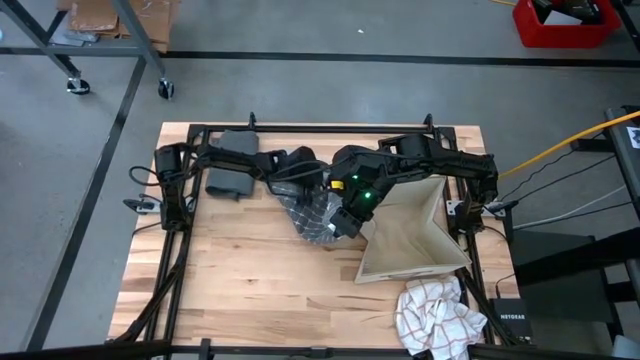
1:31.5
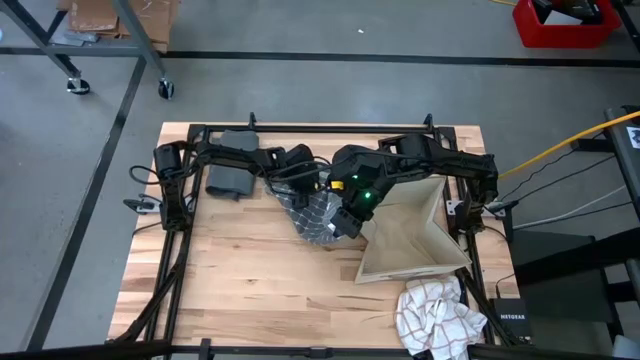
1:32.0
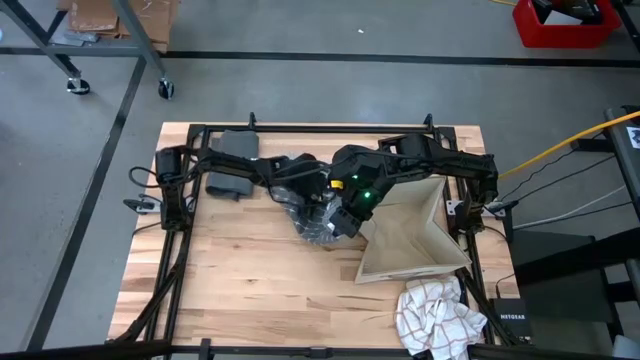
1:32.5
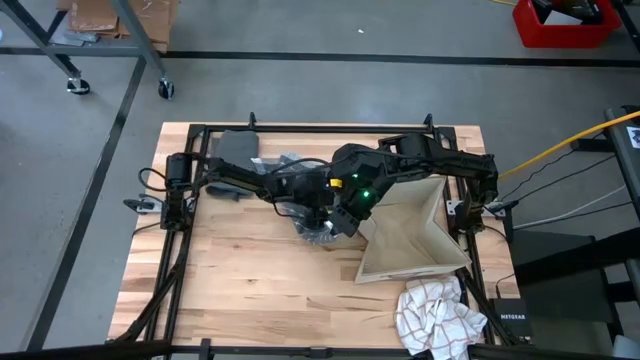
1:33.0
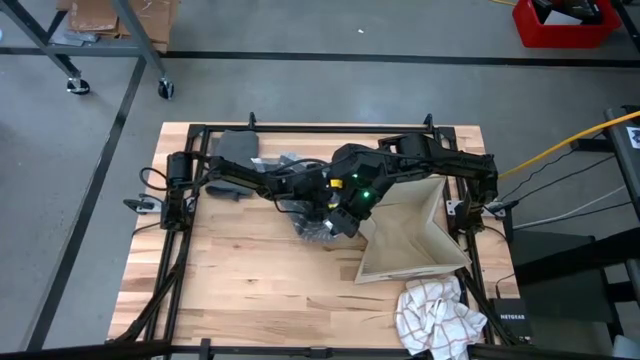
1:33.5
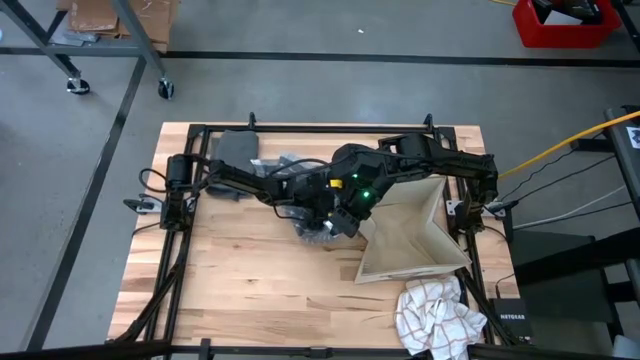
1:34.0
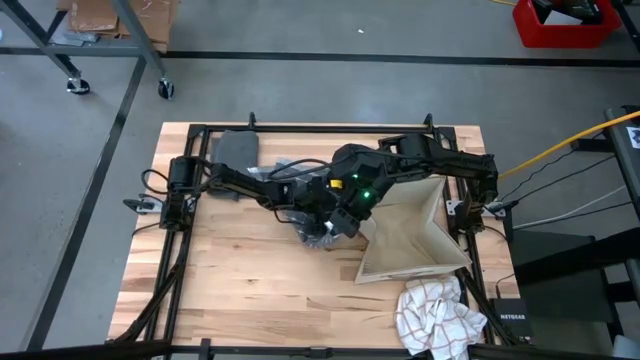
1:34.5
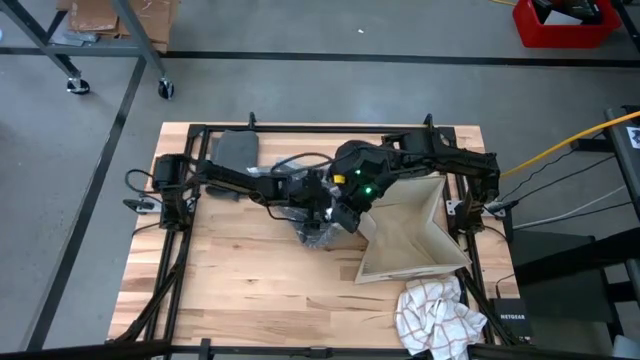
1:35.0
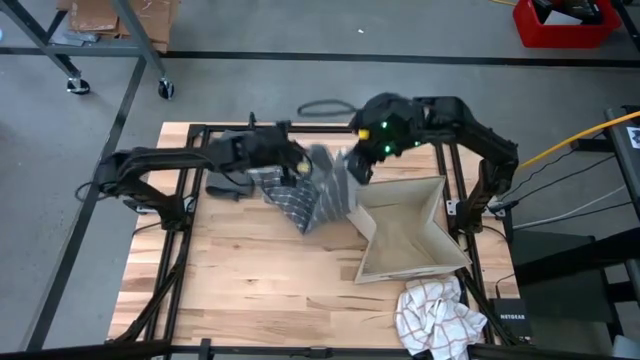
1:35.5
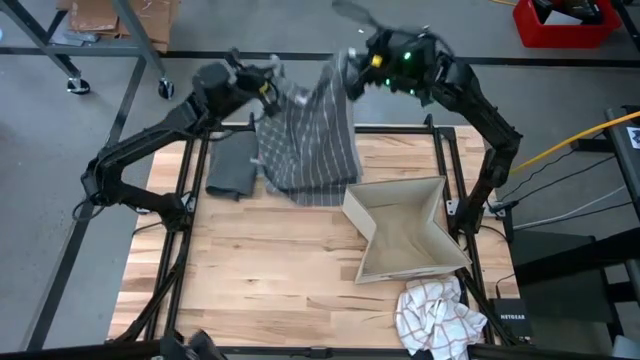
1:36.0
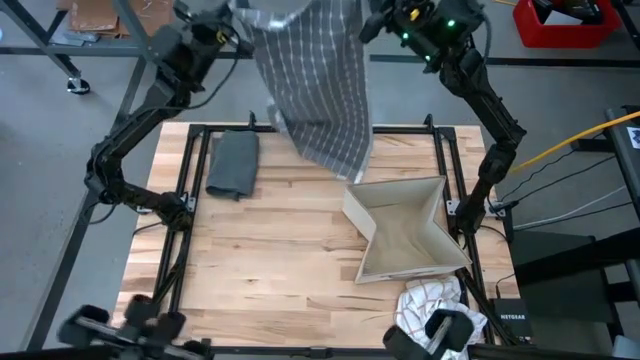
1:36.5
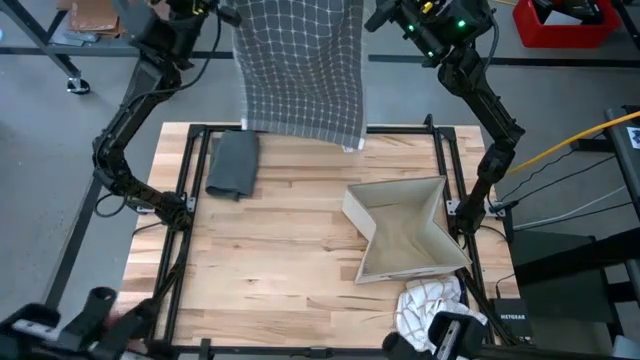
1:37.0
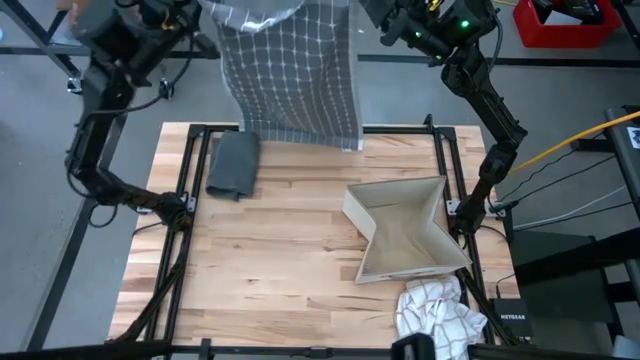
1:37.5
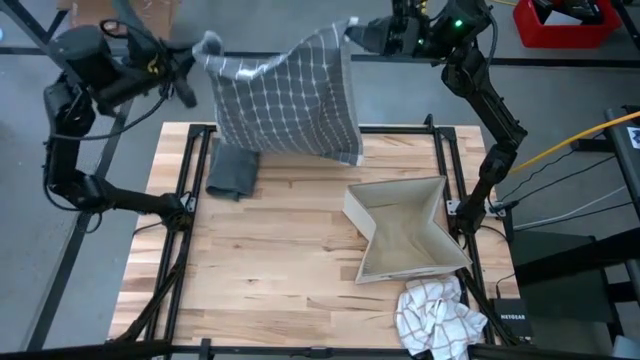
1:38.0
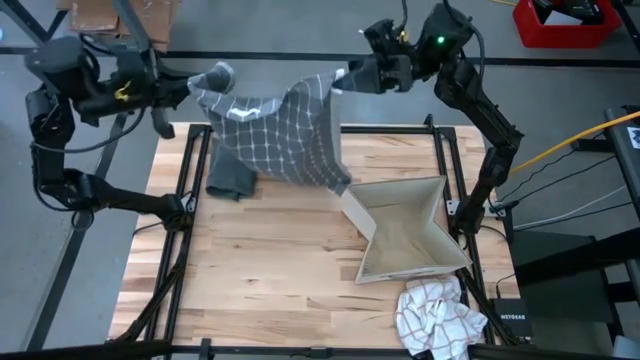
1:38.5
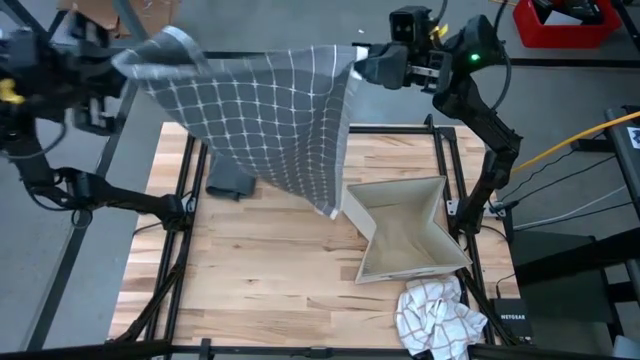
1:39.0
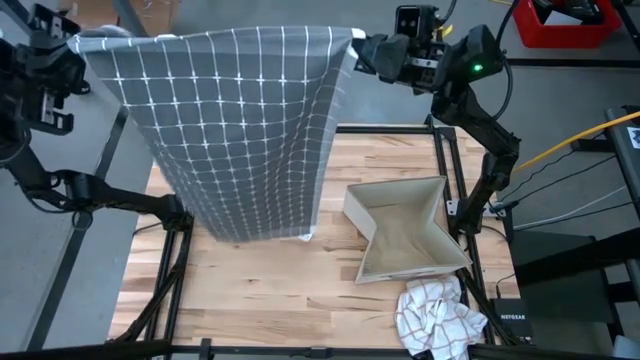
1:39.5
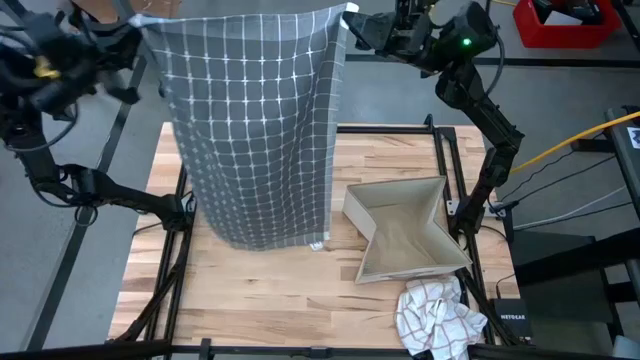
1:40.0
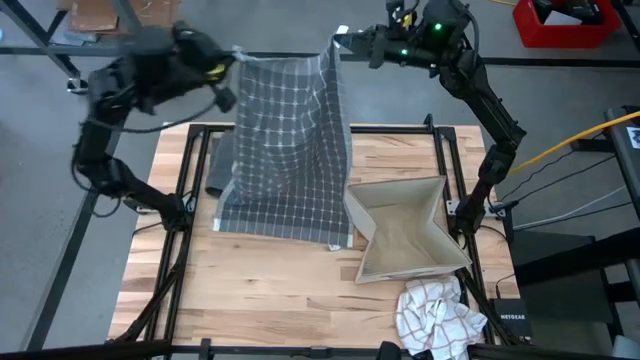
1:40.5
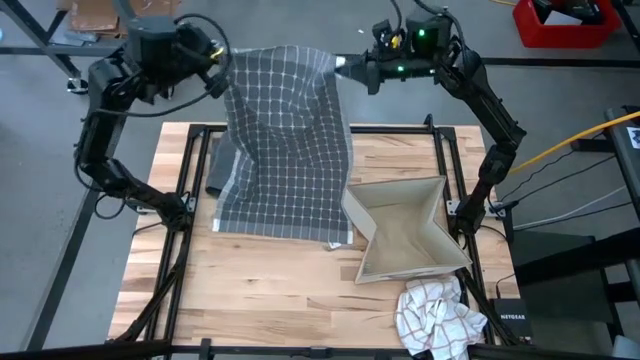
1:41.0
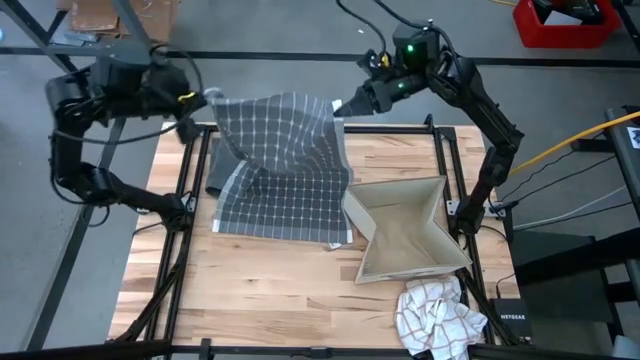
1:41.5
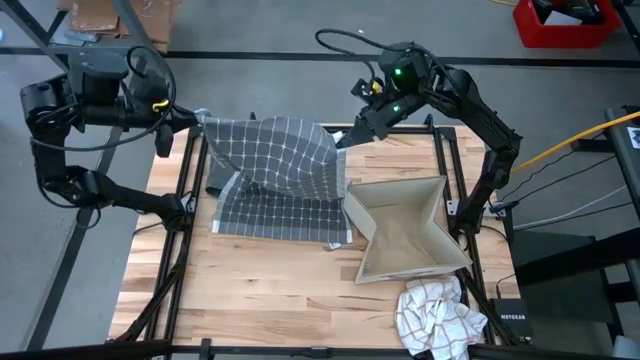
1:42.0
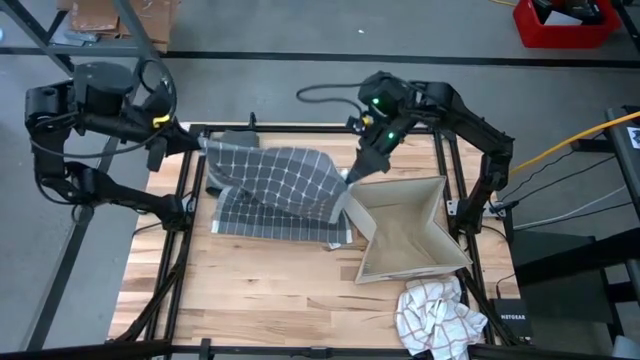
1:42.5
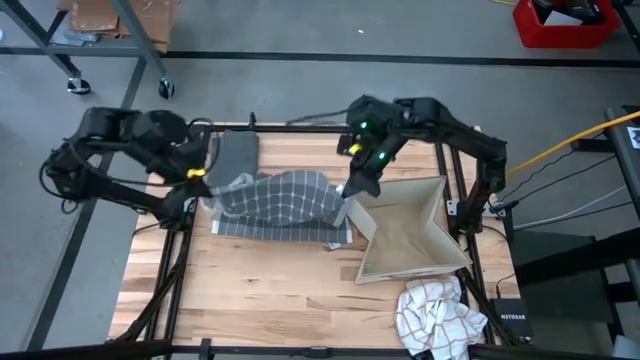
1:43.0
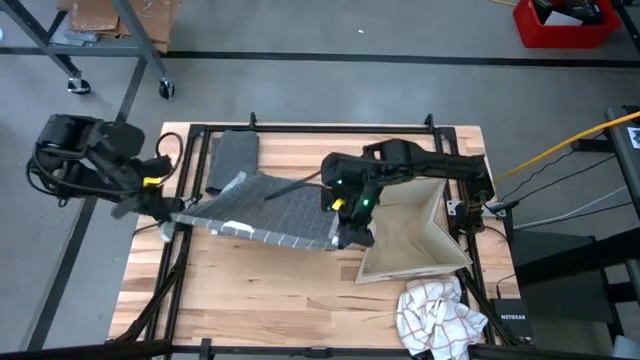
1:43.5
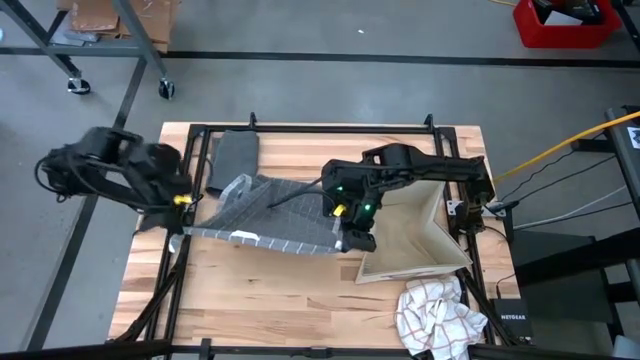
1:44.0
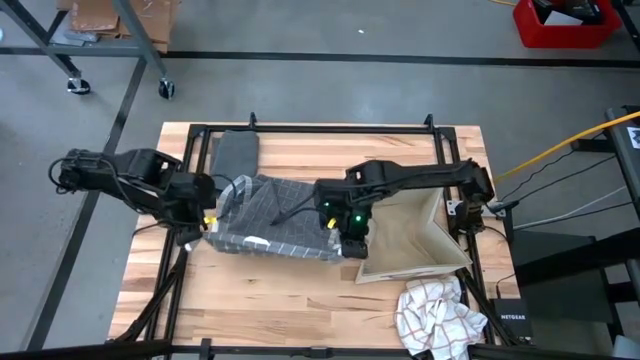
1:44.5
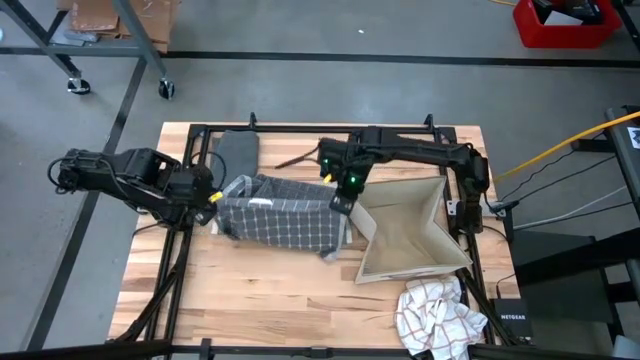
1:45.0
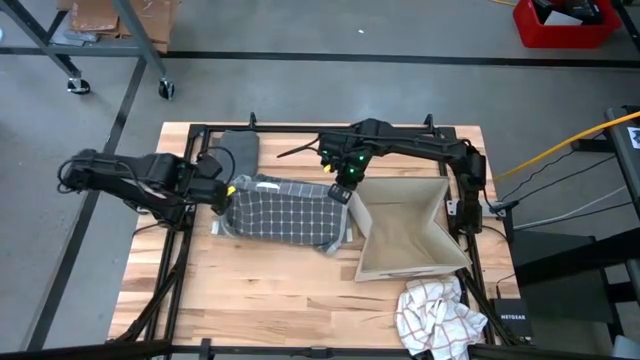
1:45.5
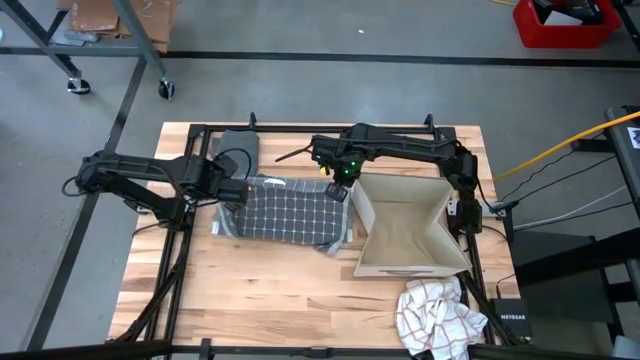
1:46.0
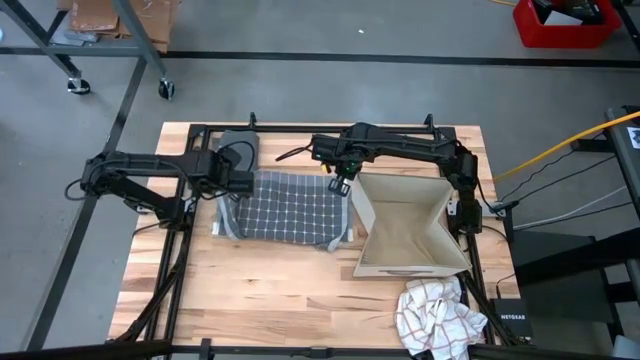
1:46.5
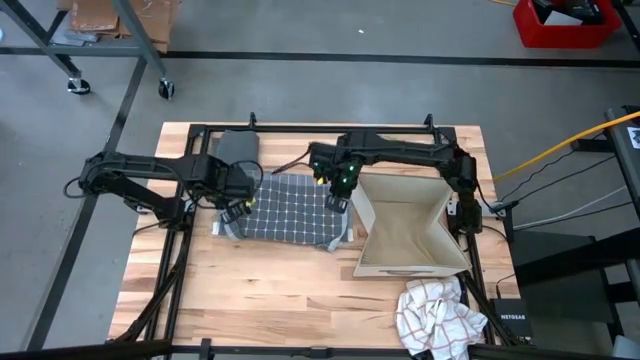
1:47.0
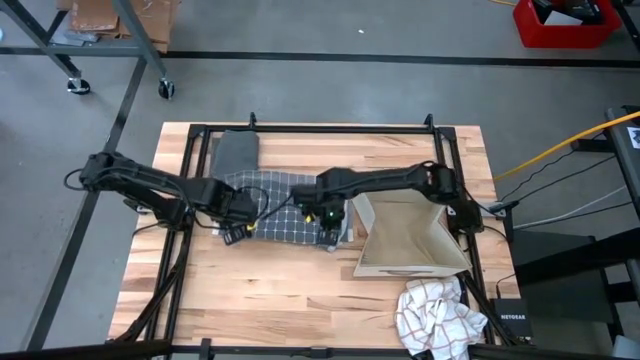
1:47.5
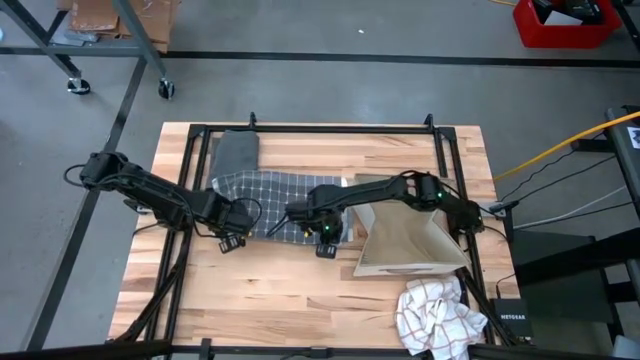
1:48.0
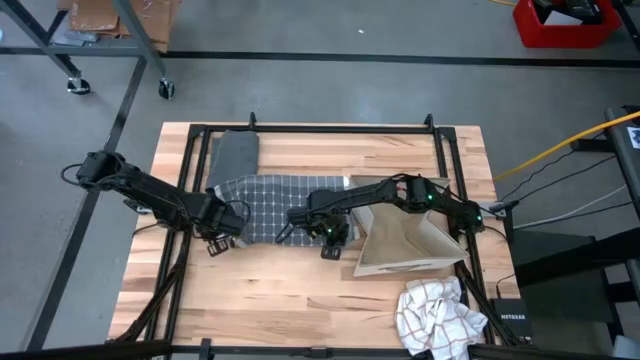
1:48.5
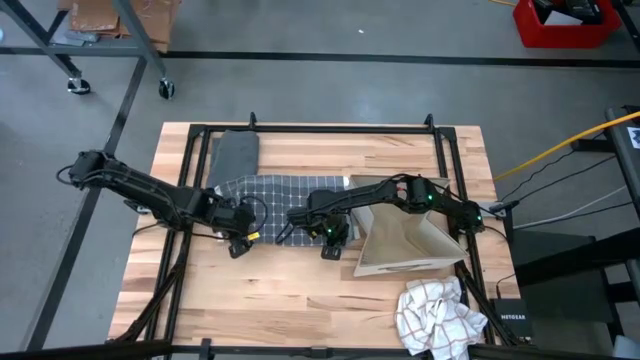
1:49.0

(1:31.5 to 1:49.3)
Task: Fold towel
Fold the gray patterned towel
